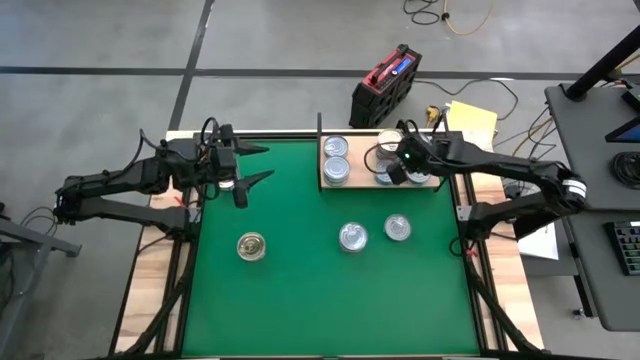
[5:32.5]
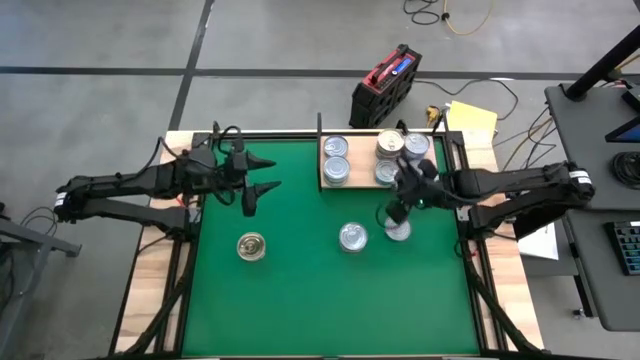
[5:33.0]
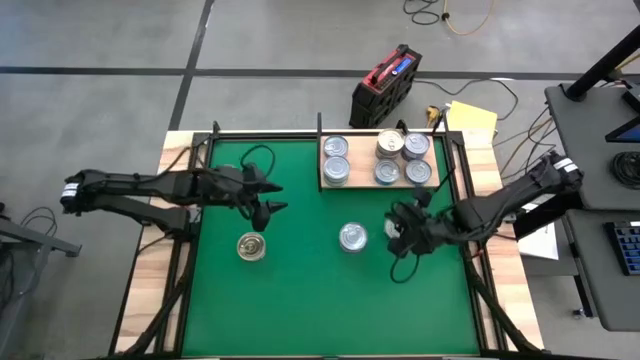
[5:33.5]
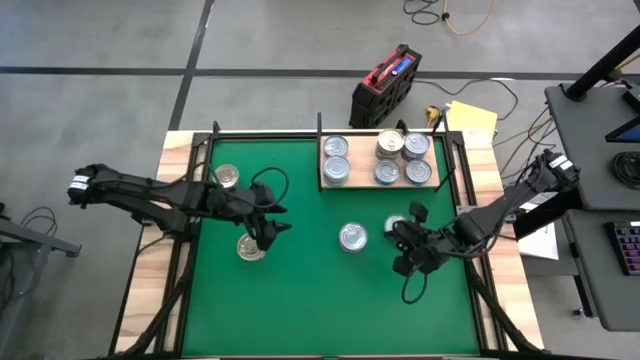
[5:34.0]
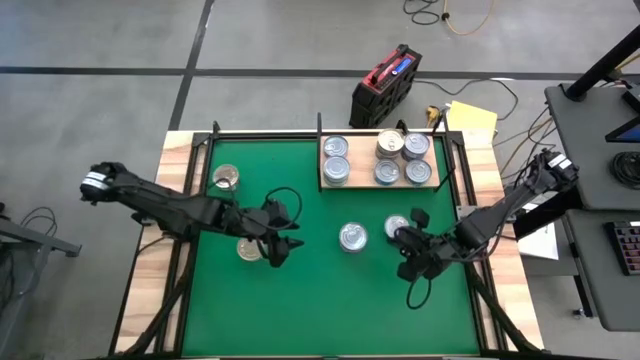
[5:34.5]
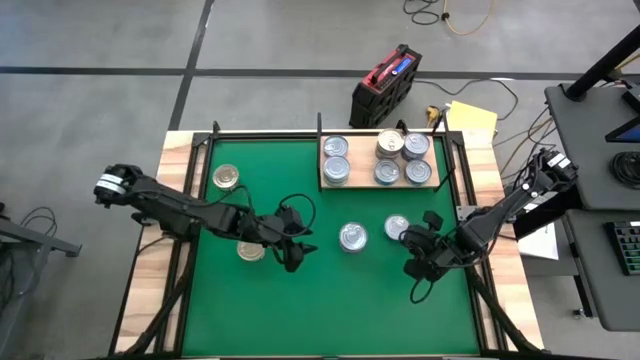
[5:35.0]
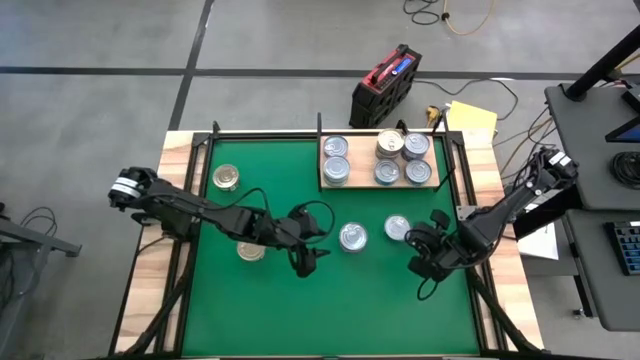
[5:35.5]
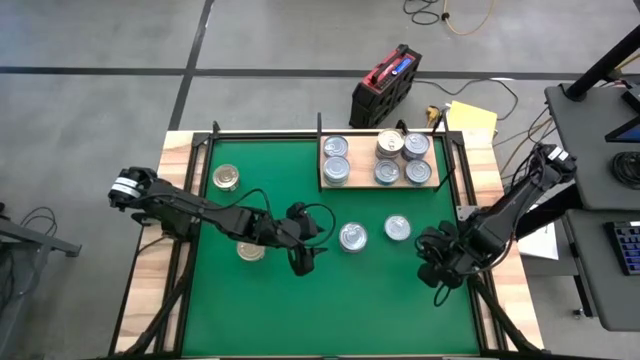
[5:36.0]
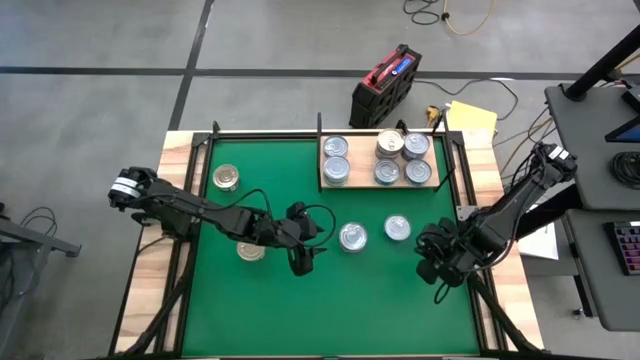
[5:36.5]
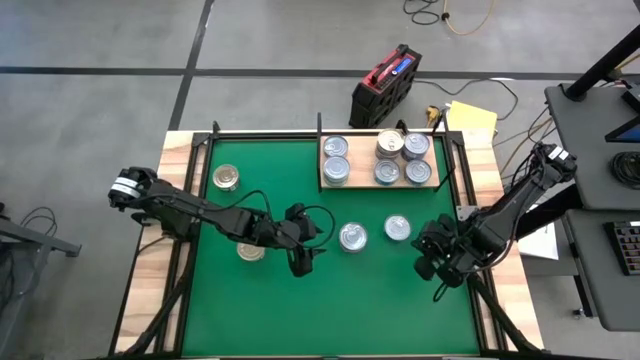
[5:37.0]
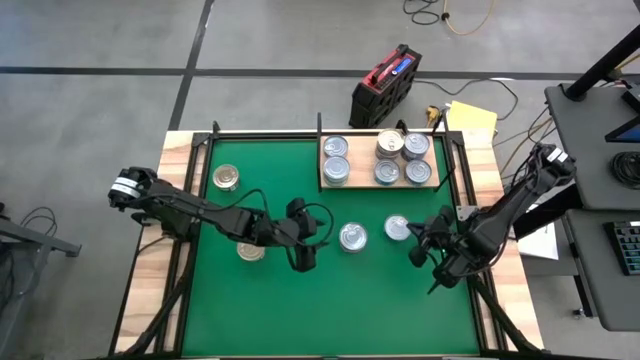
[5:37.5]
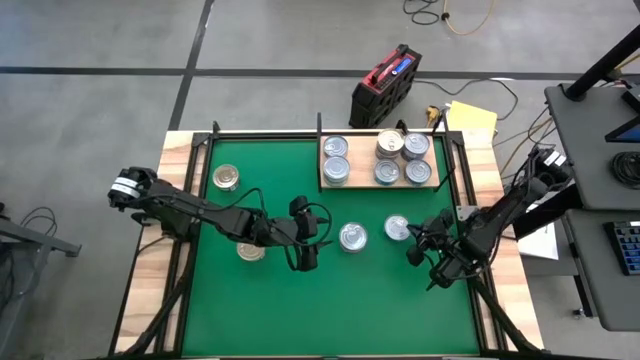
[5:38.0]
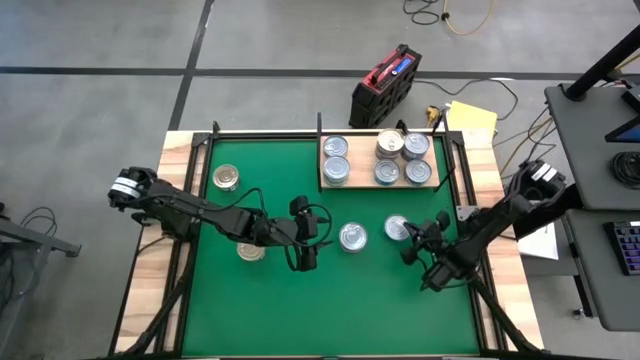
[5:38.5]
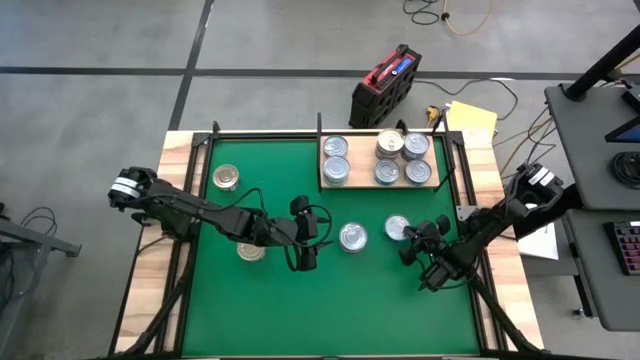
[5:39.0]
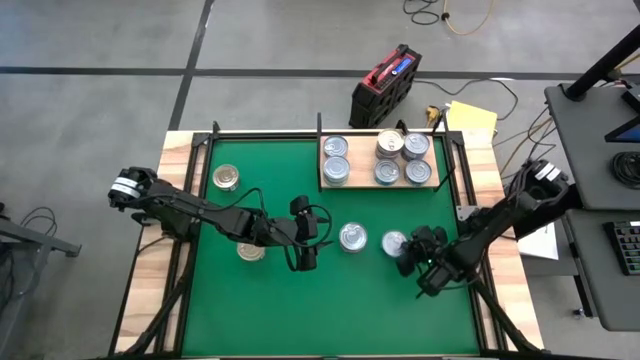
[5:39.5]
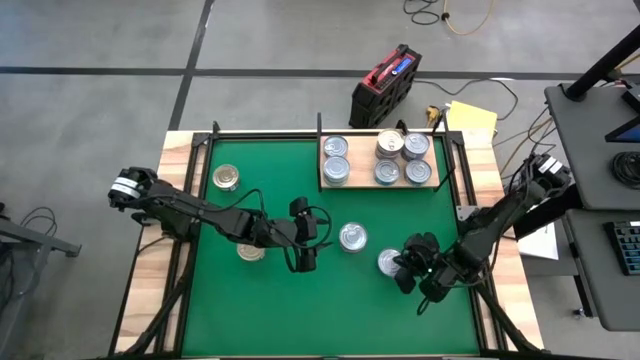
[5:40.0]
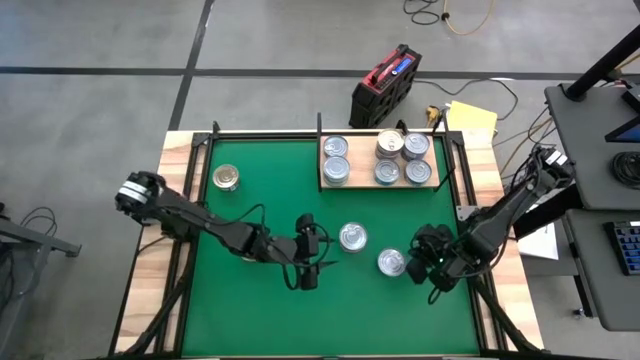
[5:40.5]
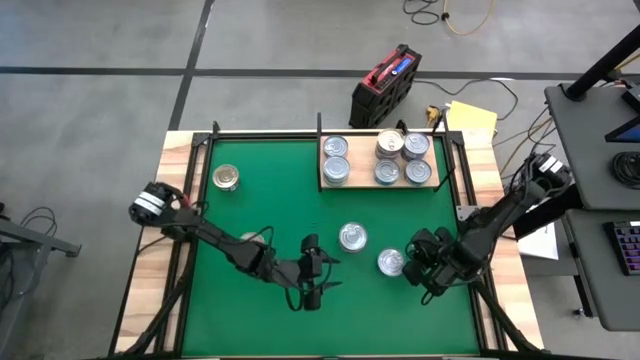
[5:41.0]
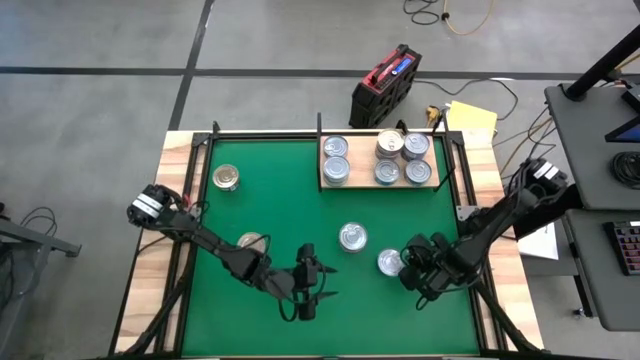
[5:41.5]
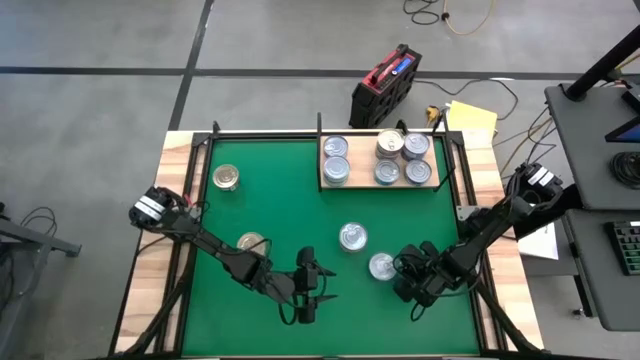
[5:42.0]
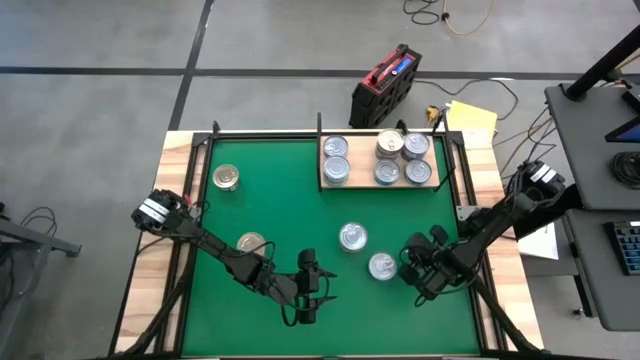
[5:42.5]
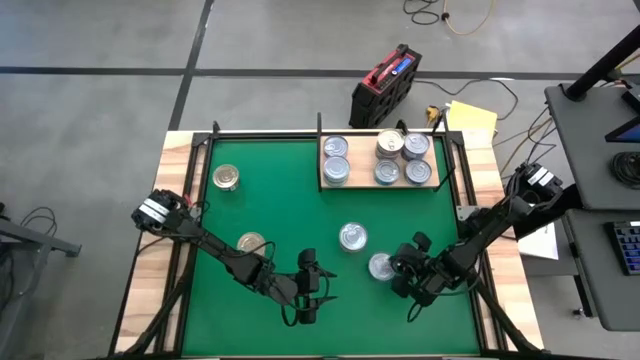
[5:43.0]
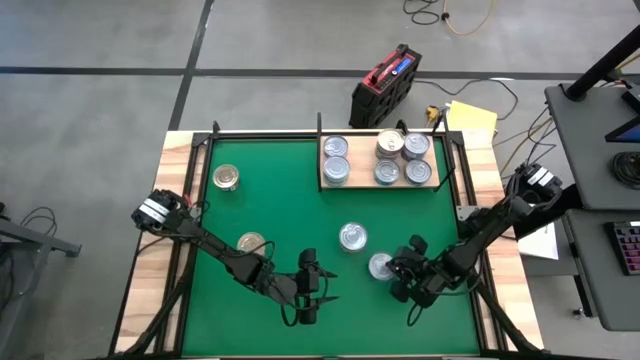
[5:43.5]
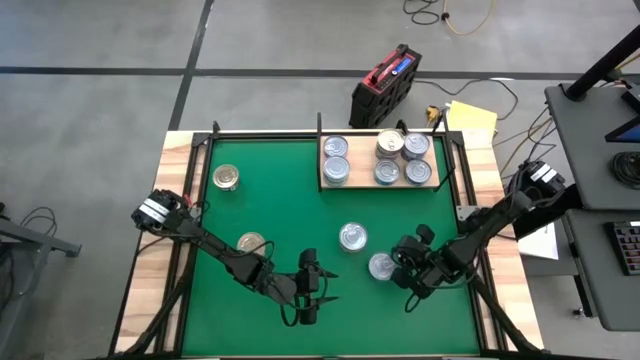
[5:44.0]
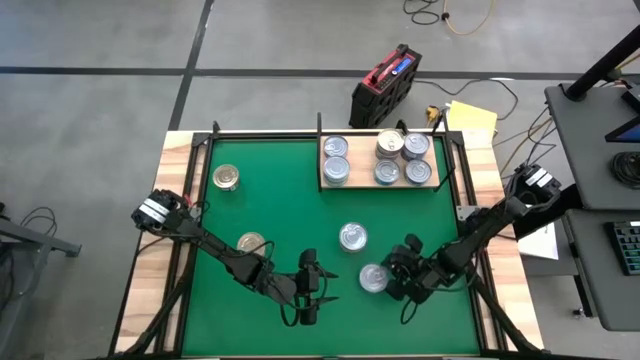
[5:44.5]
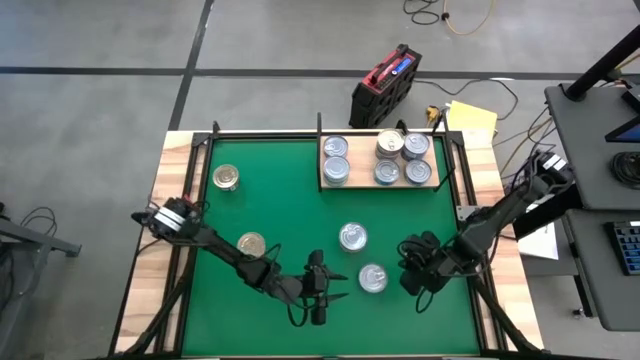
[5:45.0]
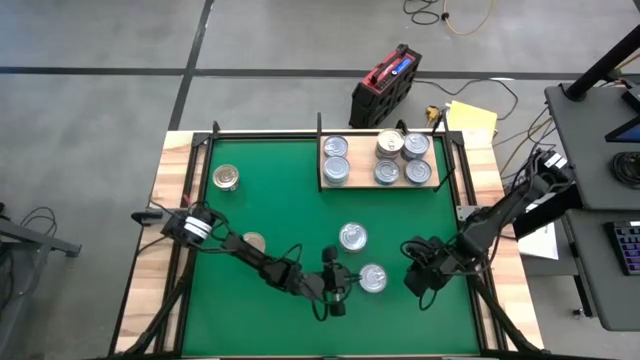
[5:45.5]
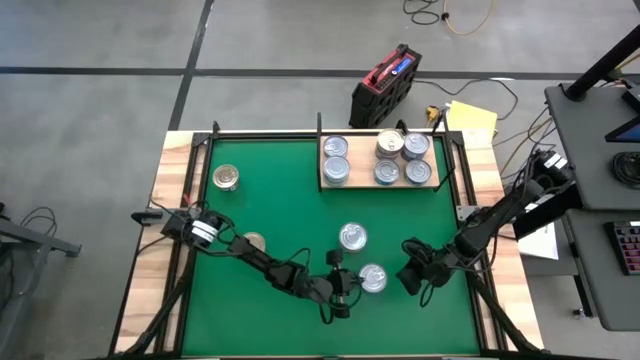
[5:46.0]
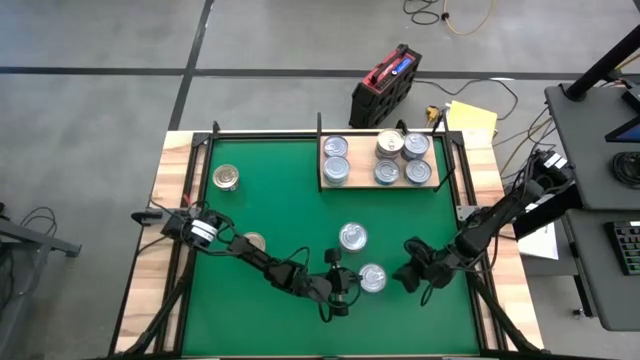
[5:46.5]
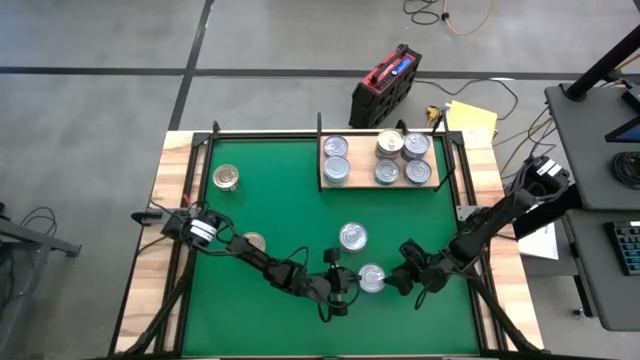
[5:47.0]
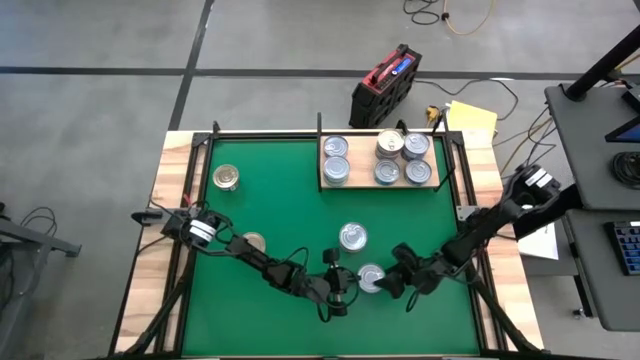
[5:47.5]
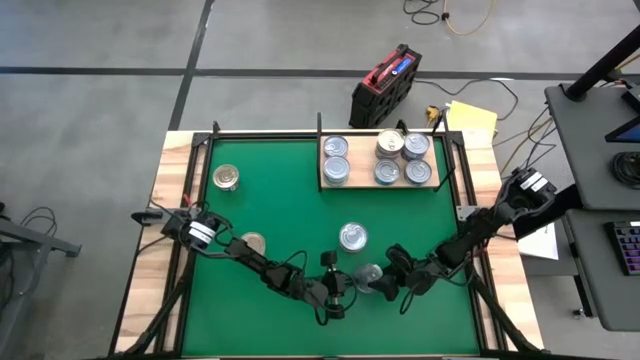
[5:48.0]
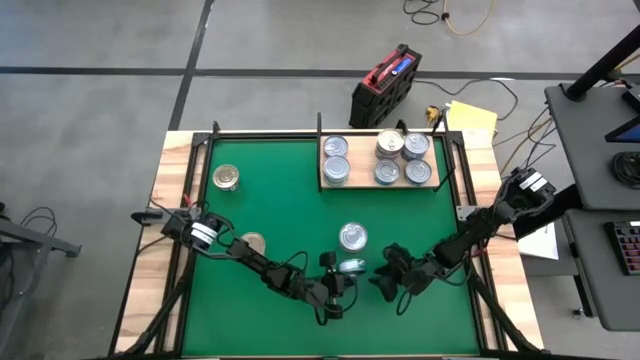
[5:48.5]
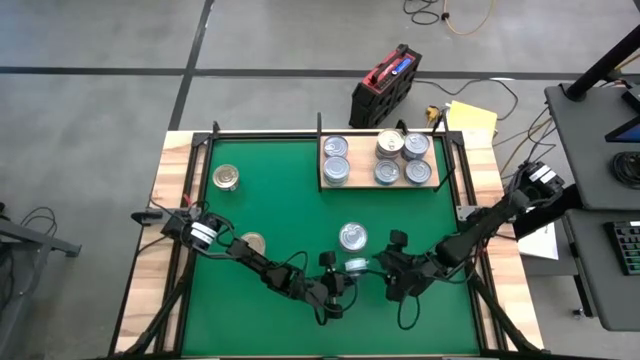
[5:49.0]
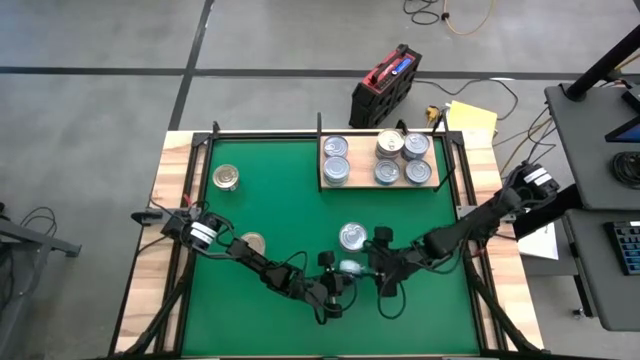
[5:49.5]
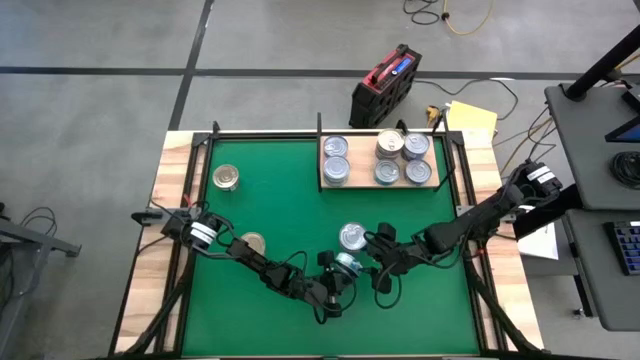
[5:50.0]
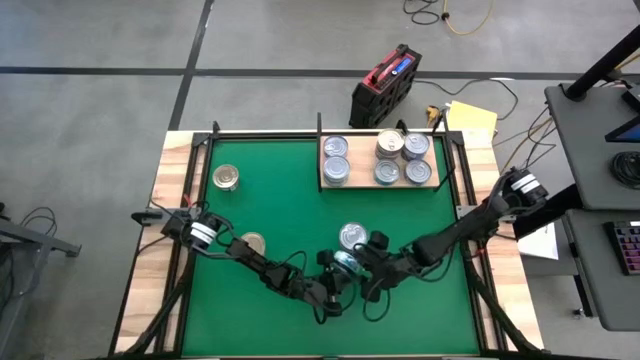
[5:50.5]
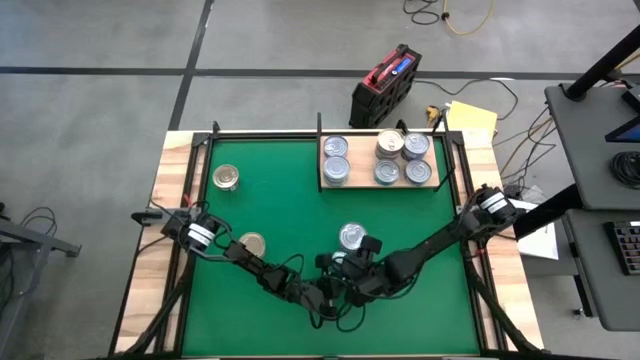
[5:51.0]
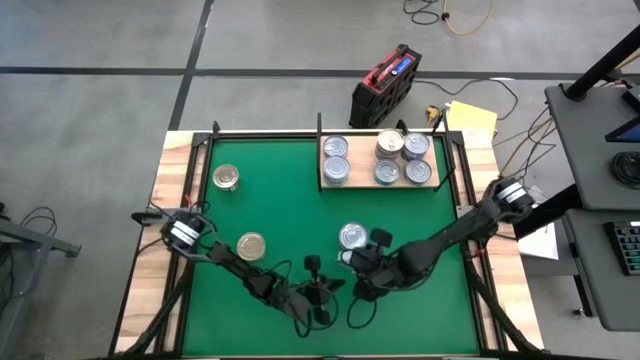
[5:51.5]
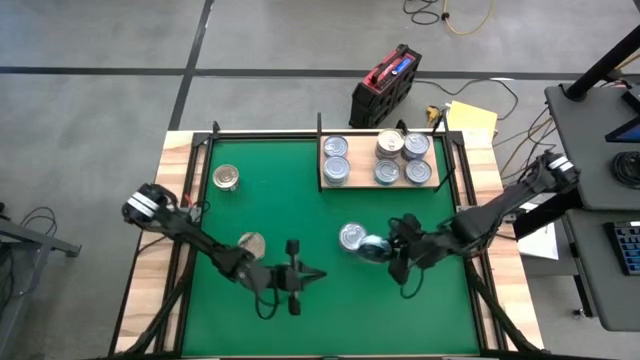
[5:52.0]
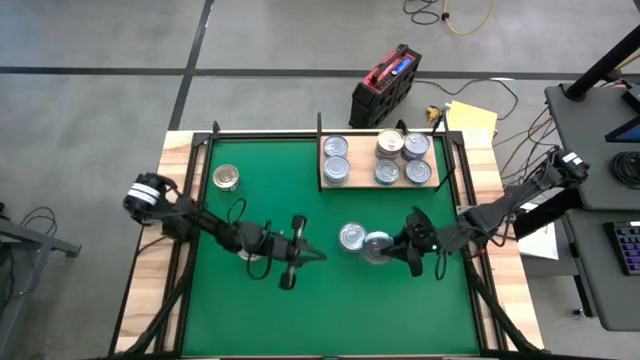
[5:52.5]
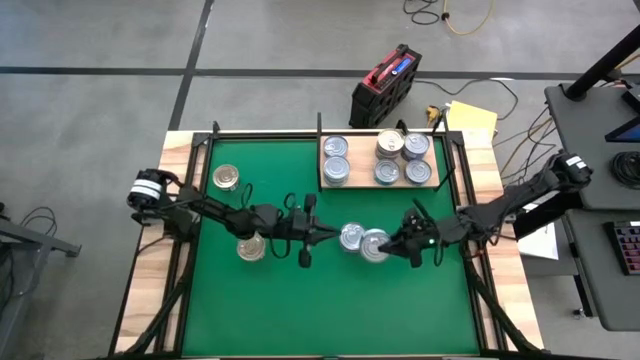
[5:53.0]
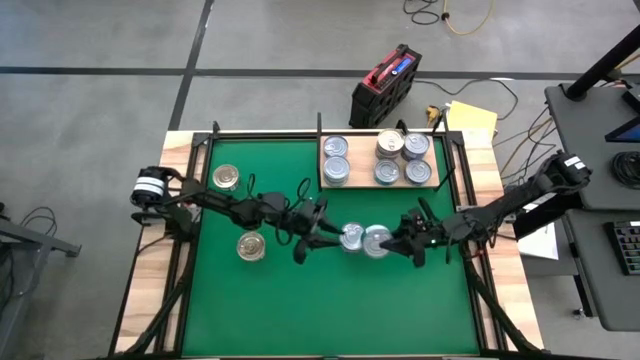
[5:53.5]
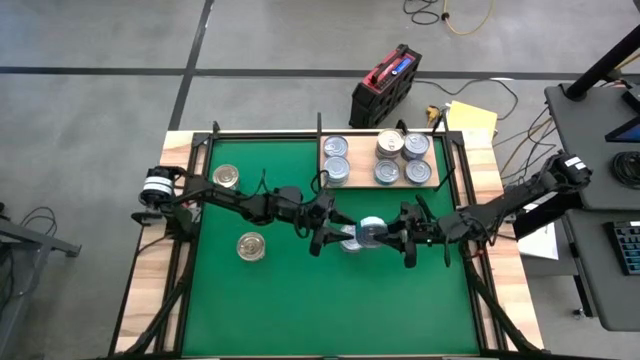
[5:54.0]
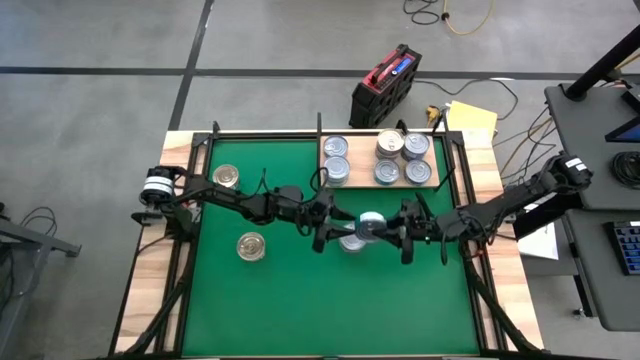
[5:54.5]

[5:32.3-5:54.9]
Task: Stack canned seafood by type on shelf
Stack the green/blue tuna can on top of the green/blue tuna can on the shelf
